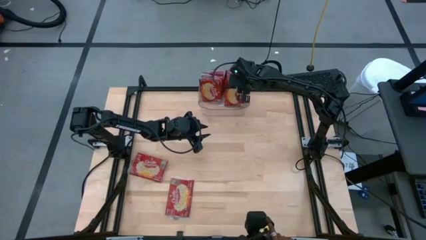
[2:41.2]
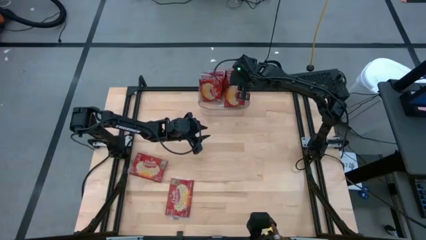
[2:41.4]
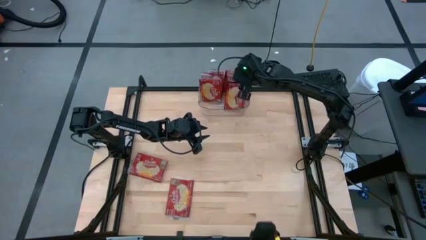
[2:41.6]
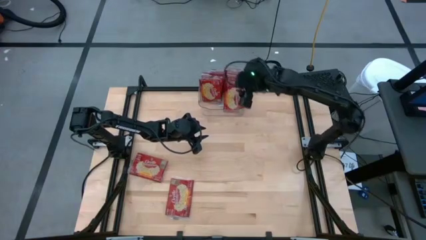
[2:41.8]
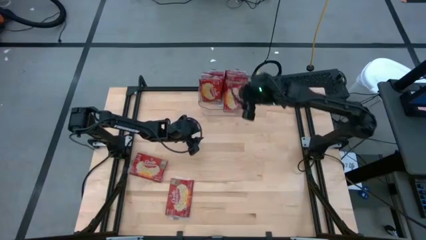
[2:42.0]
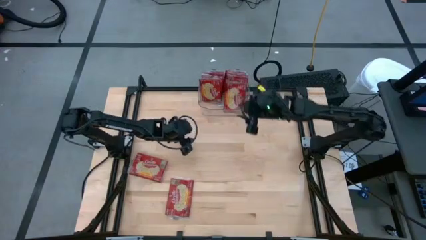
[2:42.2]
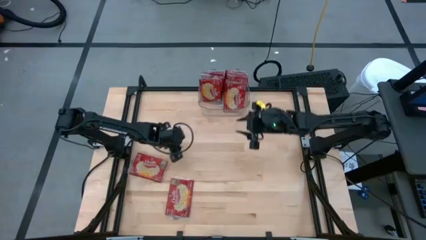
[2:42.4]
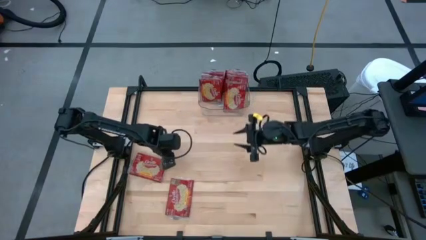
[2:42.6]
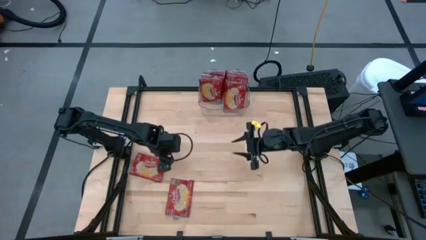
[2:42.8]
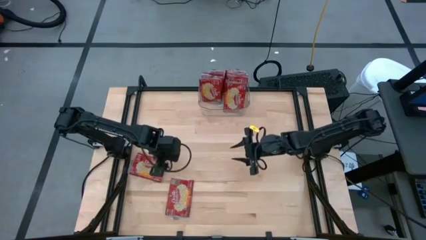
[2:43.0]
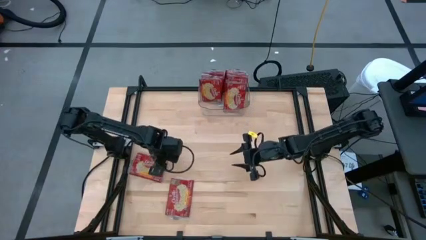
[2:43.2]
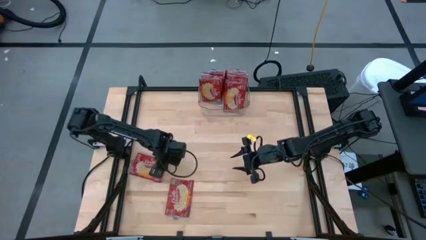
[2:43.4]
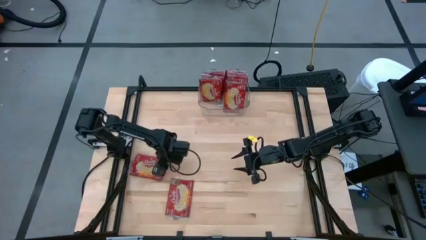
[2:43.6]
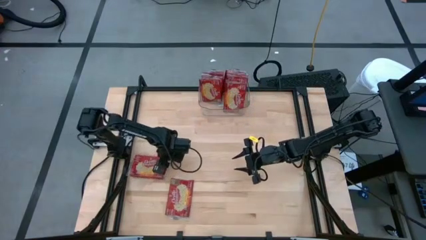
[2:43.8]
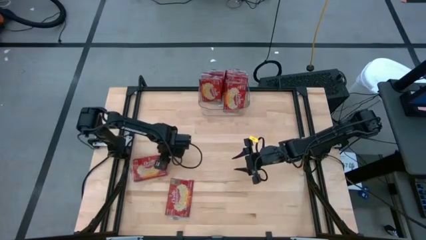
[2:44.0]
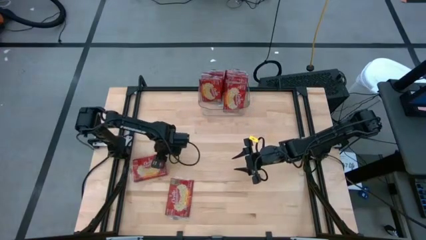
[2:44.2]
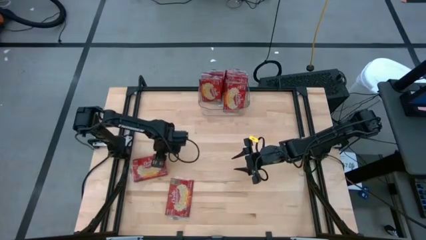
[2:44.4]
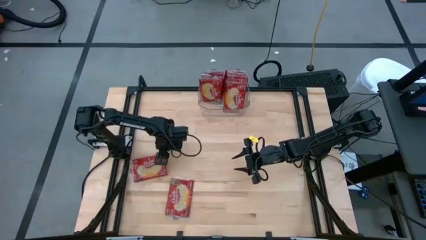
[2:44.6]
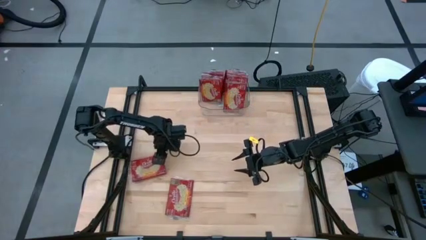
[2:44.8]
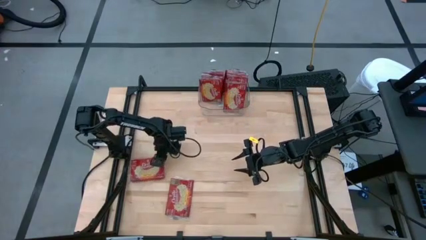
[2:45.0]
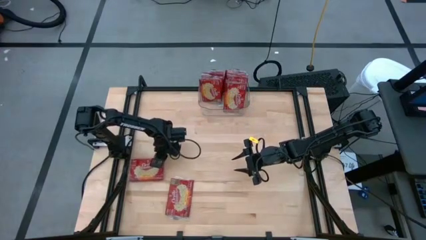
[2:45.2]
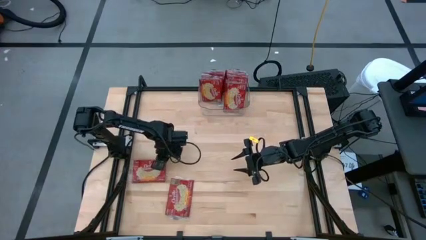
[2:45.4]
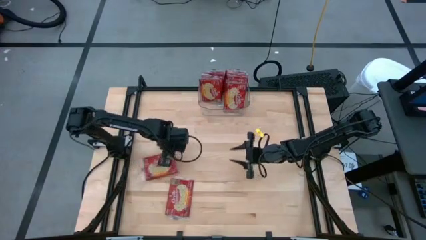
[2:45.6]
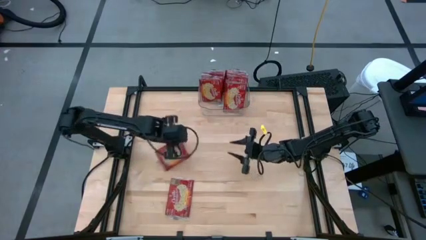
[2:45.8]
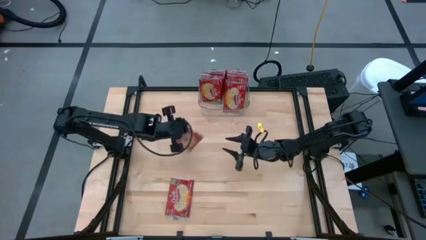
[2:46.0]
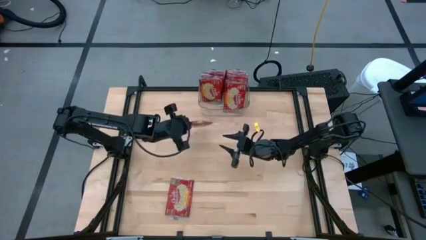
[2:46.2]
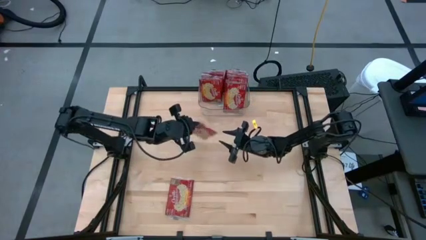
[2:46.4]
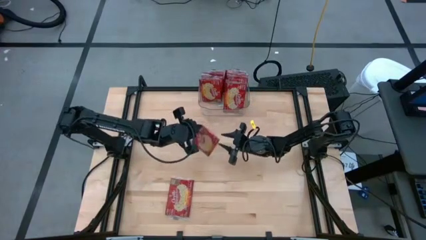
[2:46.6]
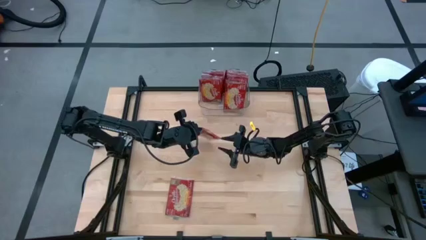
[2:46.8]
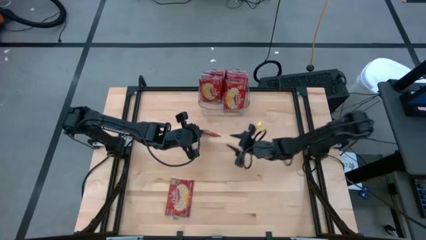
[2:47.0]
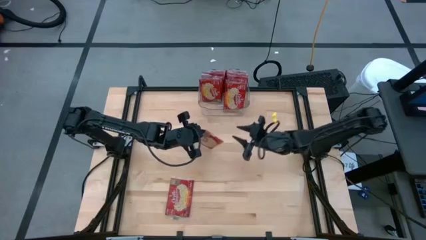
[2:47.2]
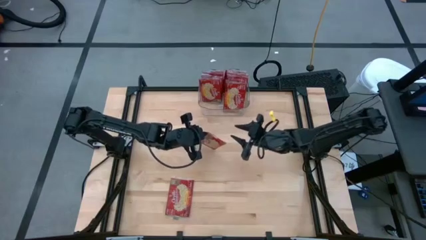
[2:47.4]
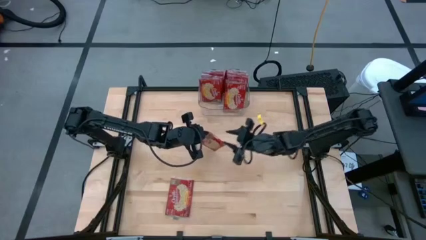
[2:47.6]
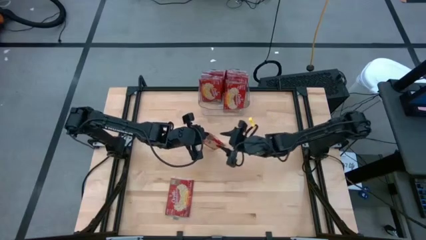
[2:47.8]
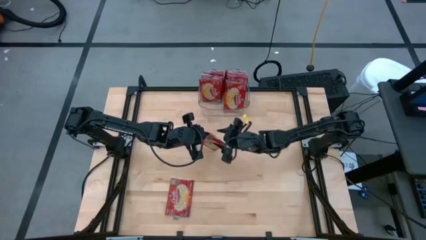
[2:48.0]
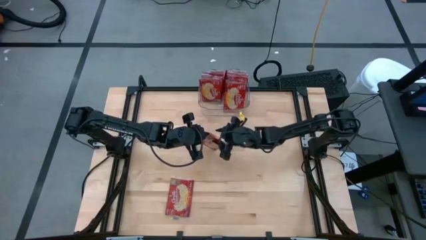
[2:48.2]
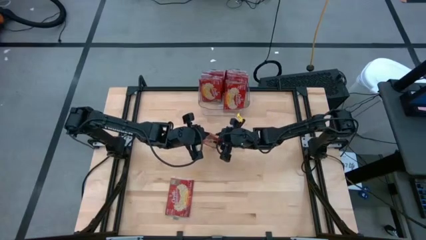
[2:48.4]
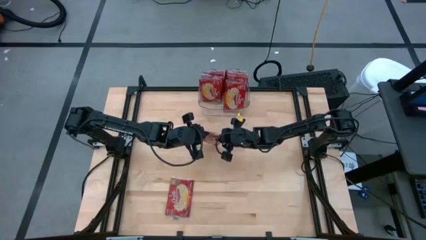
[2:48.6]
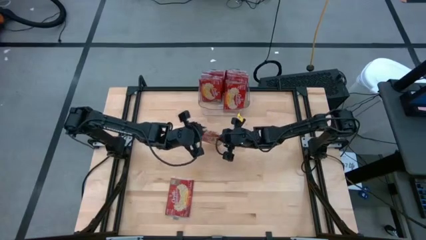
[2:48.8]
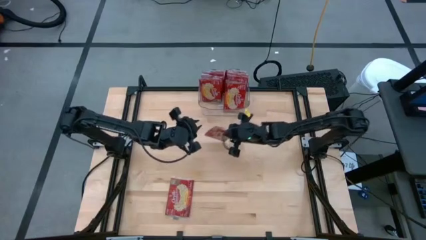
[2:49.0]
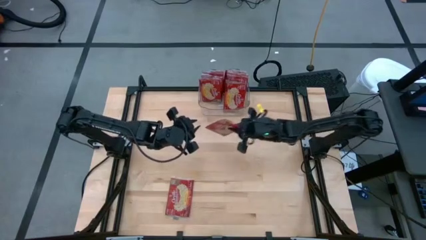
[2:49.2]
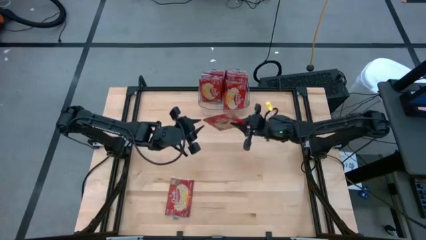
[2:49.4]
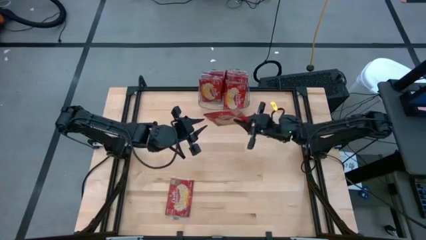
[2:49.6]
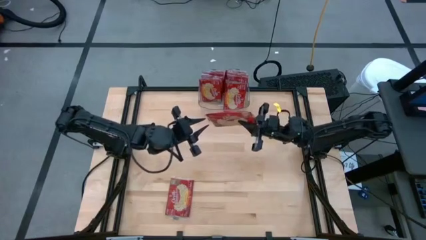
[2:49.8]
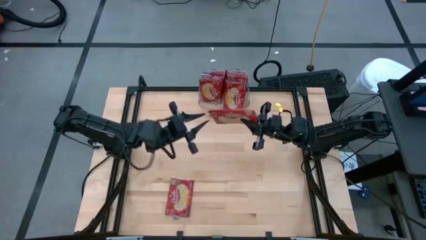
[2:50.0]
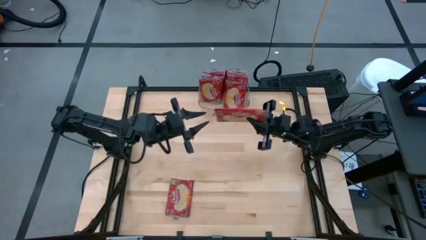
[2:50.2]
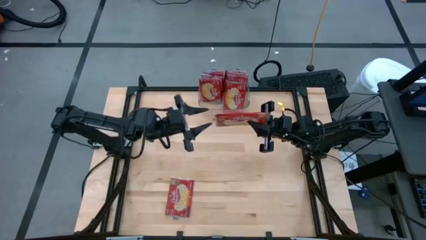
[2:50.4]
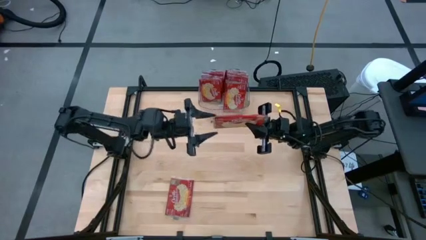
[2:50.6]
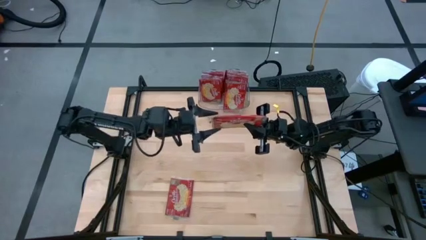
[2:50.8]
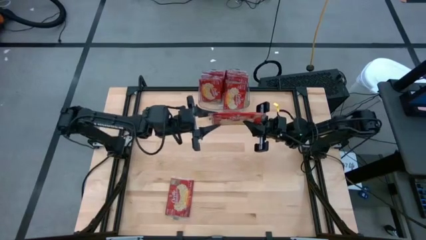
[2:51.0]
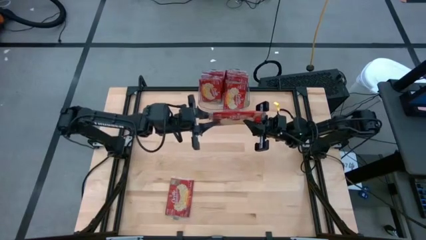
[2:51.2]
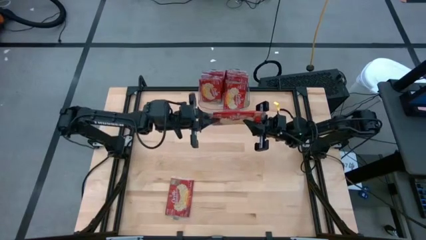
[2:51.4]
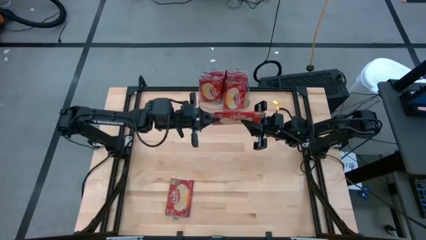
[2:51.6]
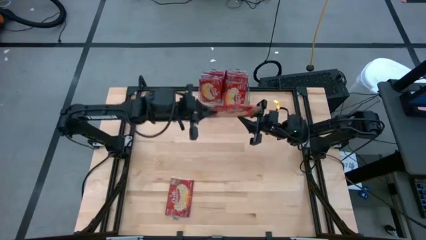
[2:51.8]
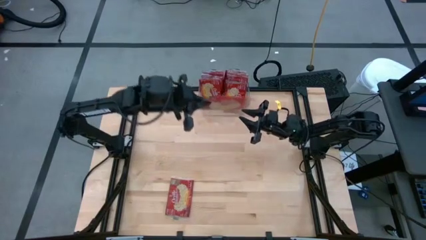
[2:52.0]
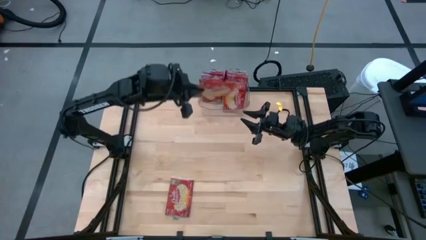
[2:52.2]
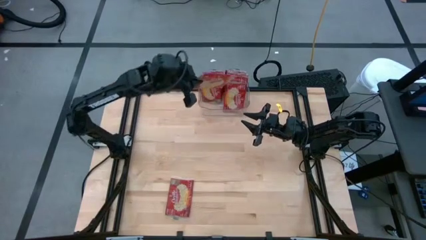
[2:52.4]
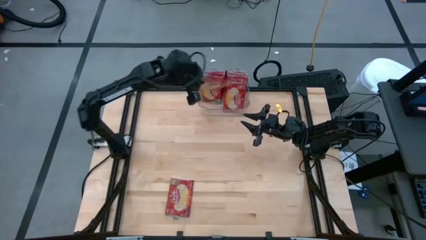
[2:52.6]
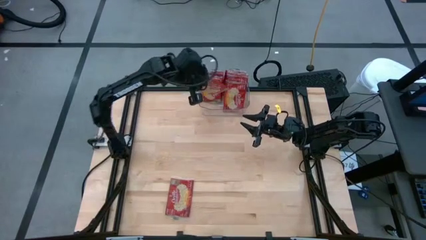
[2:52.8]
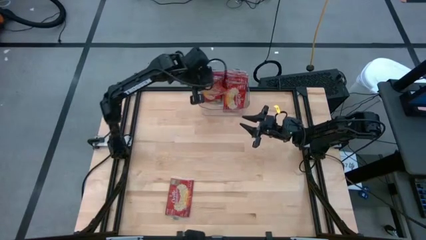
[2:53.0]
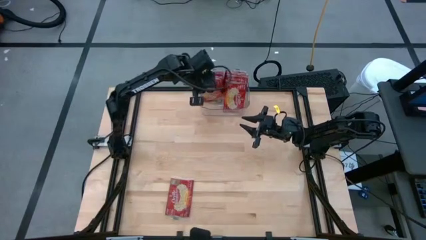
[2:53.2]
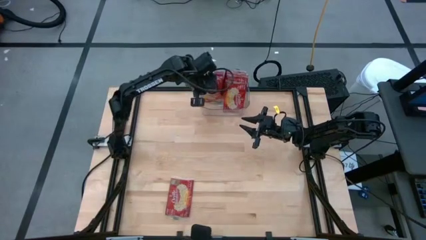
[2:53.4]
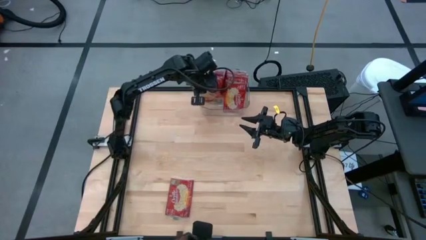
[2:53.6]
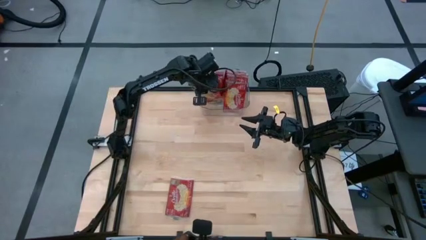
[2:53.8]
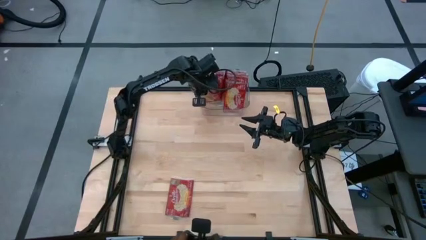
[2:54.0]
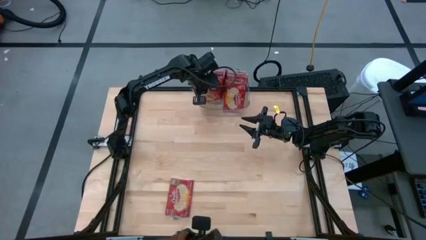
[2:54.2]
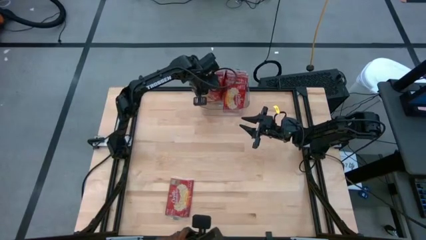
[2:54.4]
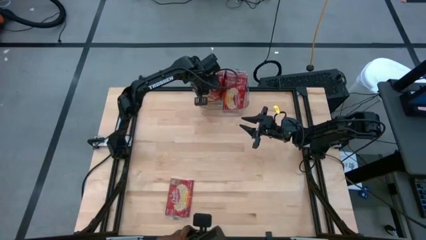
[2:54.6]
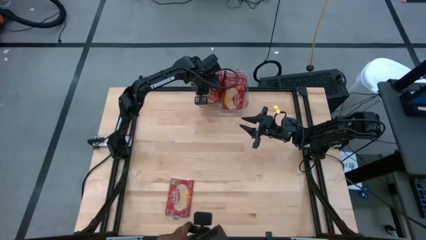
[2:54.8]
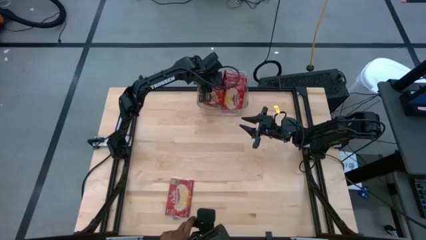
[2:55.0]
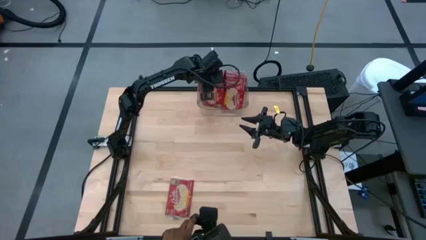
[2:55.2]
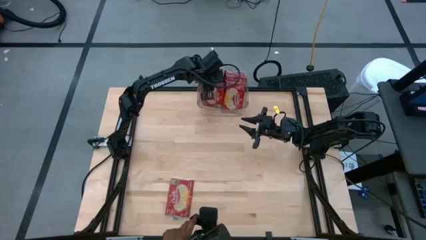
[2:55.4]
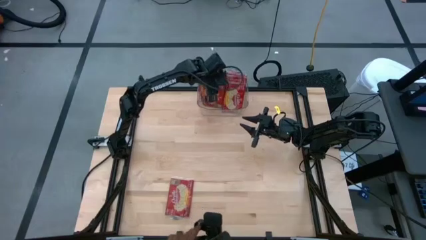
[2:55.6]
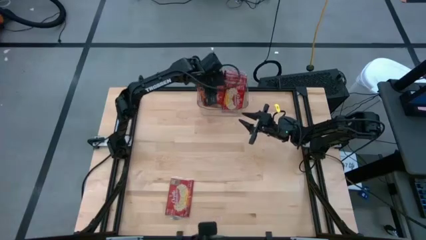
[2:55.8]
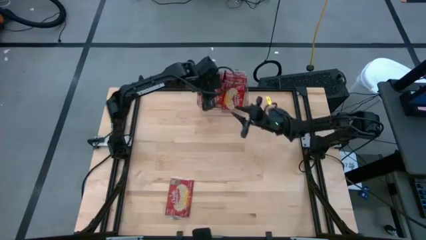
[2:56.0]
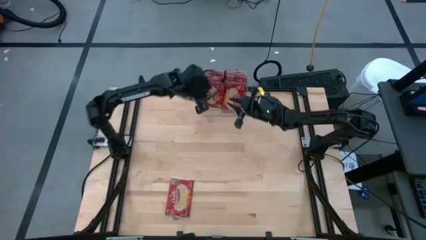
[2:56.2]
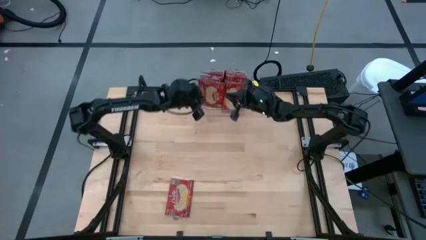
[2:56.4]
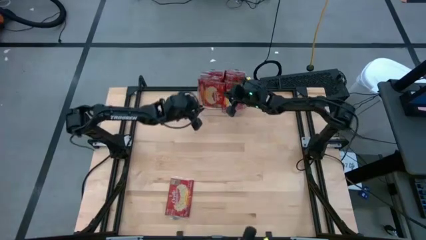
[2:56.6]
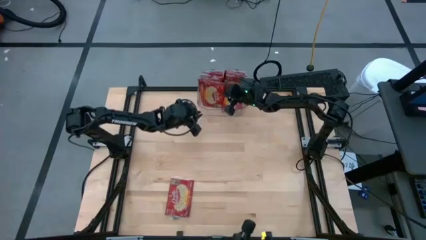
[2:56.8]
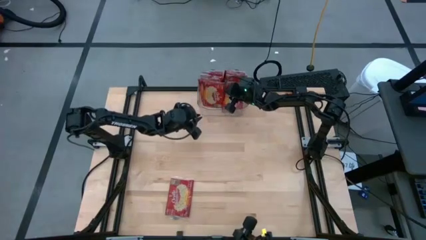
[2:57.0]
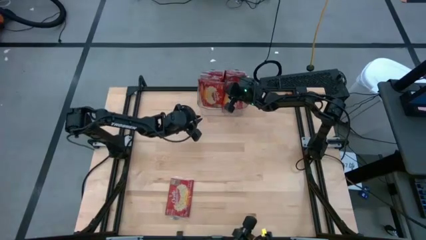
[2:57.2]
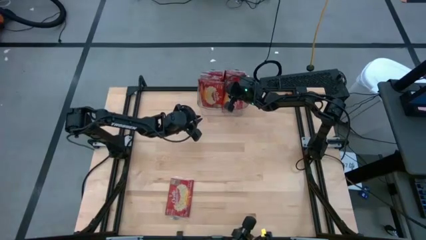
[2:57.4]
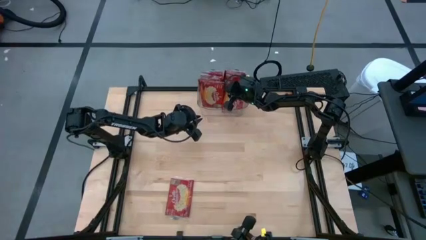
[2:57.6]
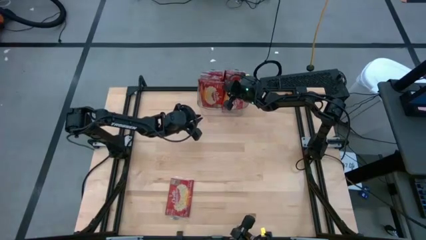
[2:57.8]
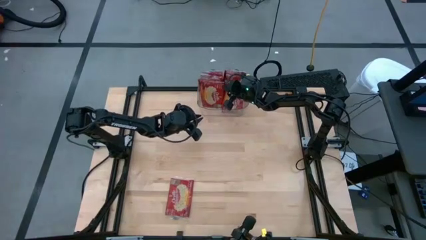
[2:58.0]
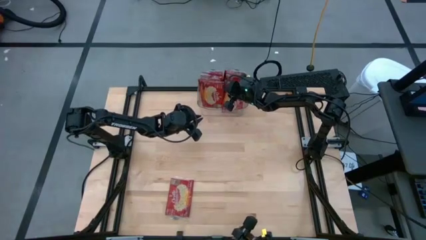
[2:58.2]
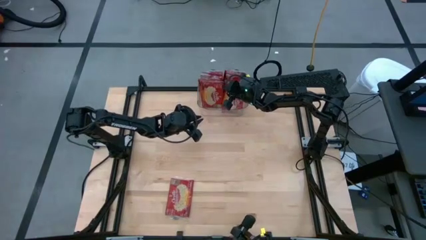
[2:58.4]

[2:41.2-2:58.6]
Task: Sort popcorn bags into baskets
Put the red popcorn bag into the transparent bin
